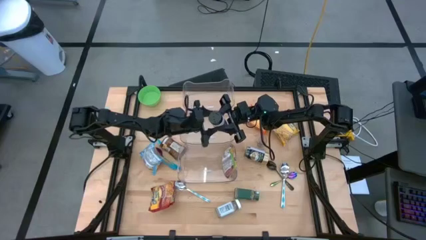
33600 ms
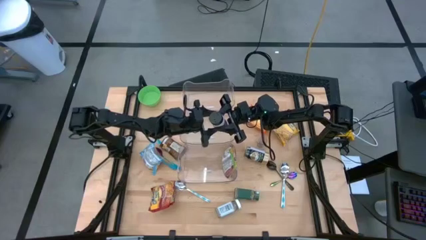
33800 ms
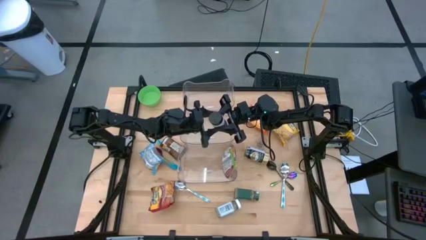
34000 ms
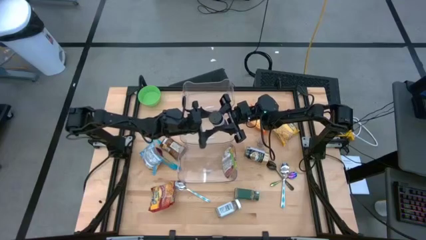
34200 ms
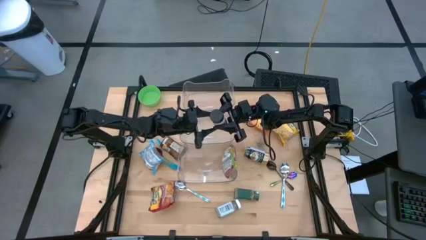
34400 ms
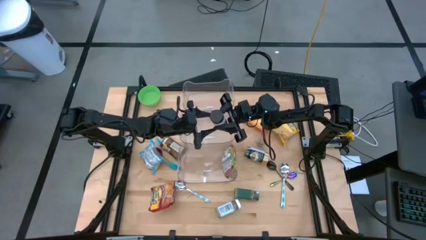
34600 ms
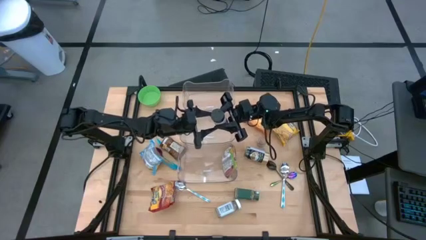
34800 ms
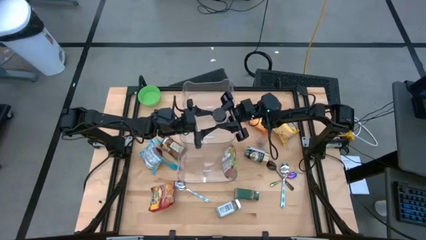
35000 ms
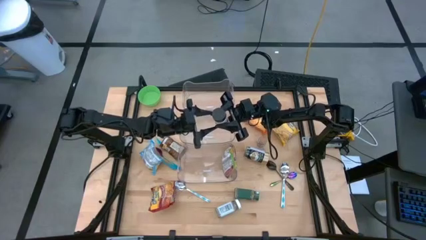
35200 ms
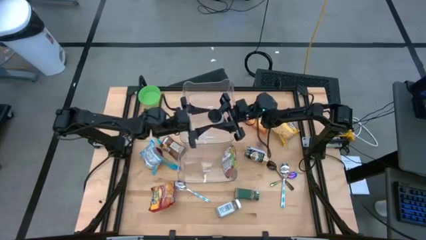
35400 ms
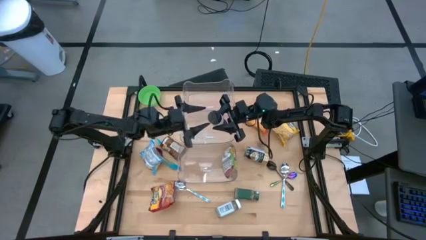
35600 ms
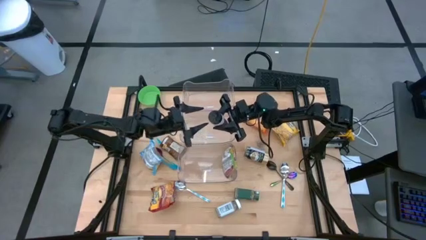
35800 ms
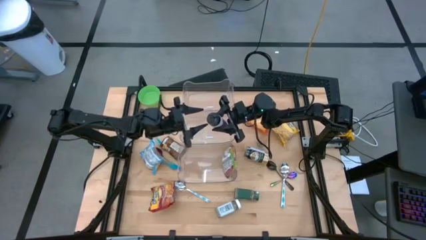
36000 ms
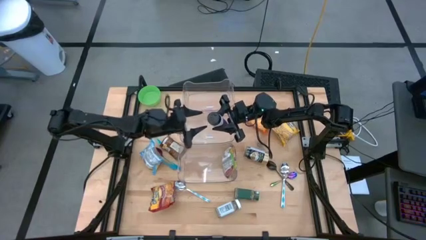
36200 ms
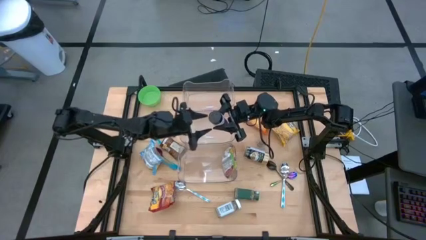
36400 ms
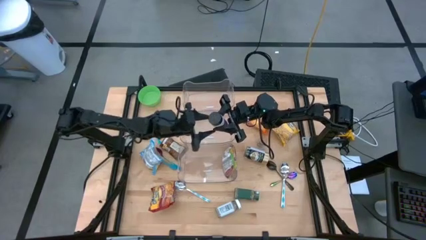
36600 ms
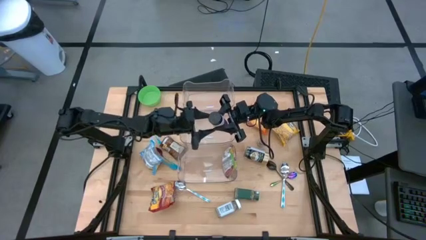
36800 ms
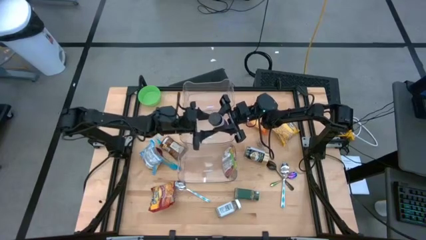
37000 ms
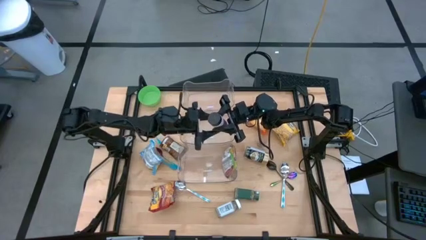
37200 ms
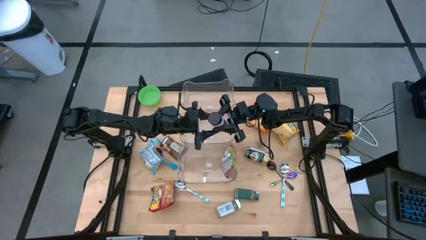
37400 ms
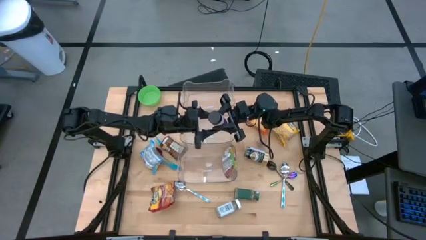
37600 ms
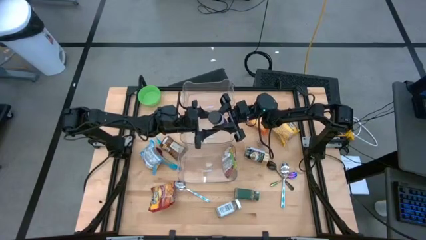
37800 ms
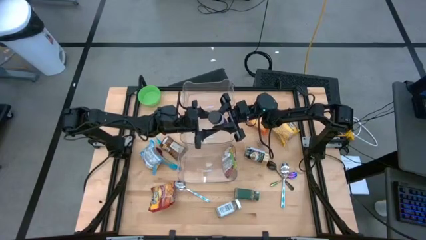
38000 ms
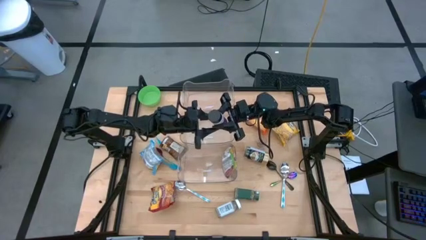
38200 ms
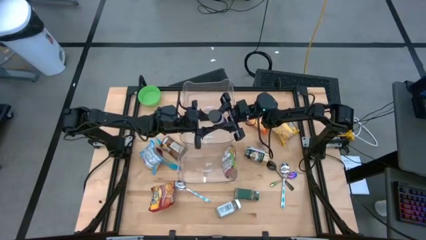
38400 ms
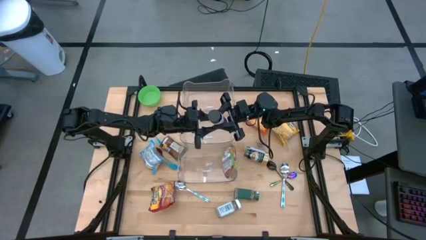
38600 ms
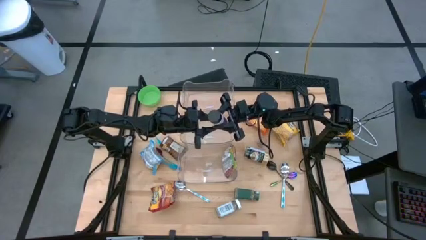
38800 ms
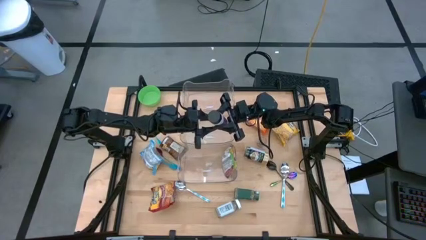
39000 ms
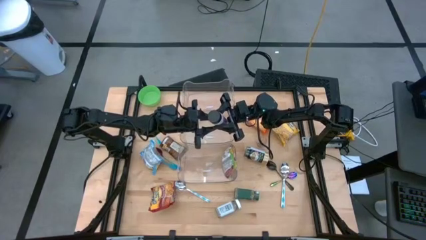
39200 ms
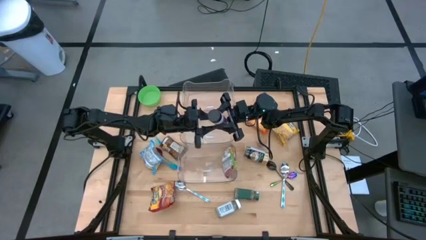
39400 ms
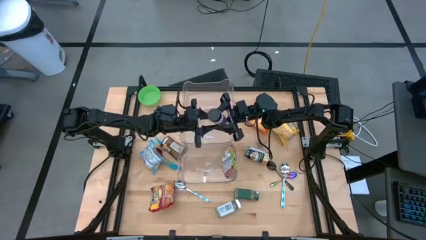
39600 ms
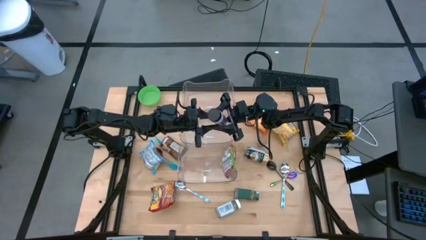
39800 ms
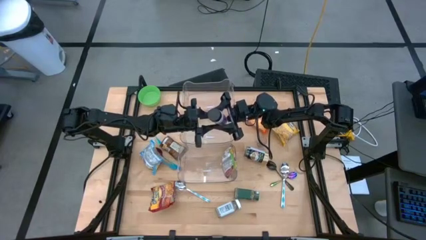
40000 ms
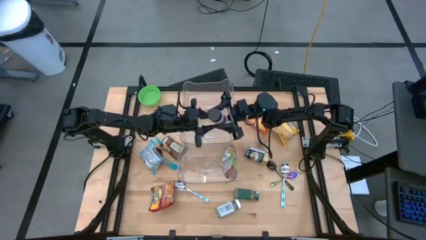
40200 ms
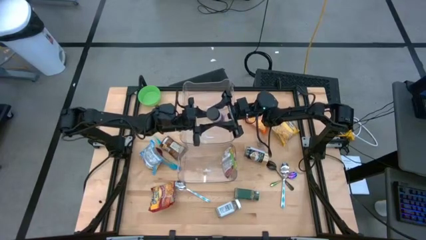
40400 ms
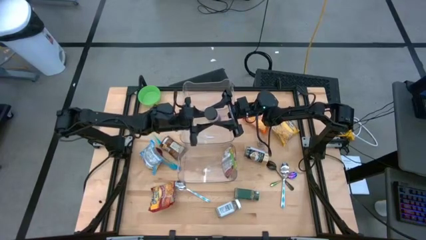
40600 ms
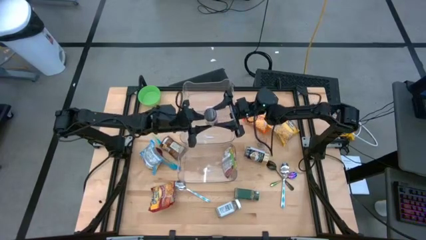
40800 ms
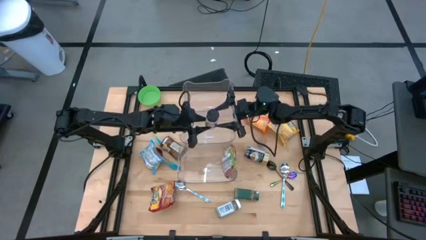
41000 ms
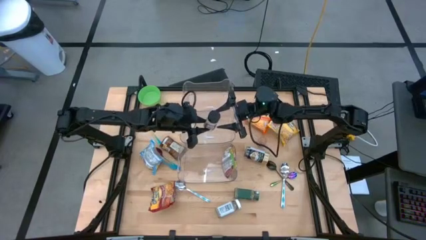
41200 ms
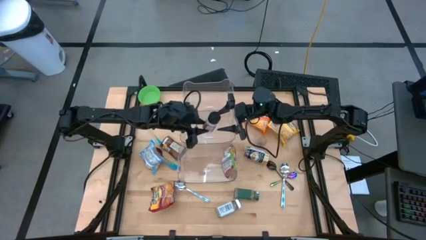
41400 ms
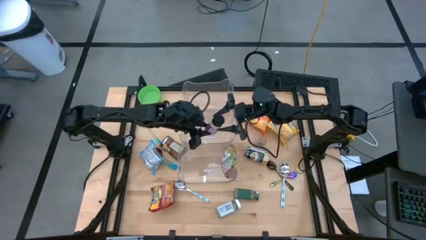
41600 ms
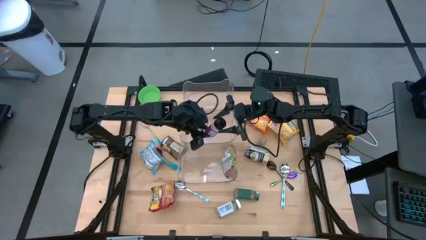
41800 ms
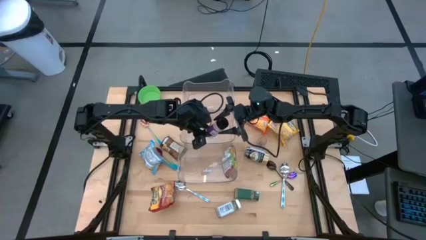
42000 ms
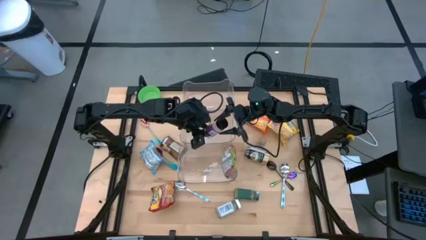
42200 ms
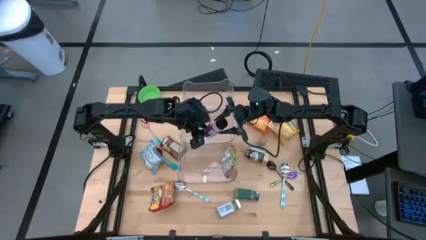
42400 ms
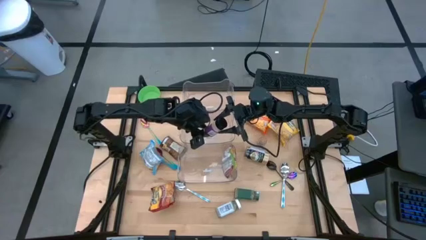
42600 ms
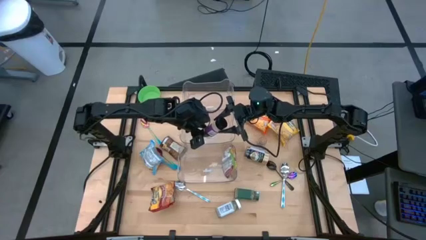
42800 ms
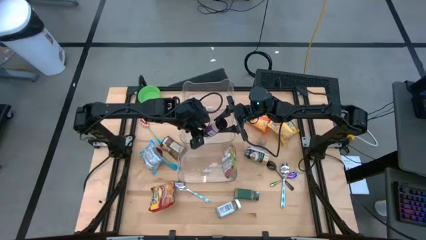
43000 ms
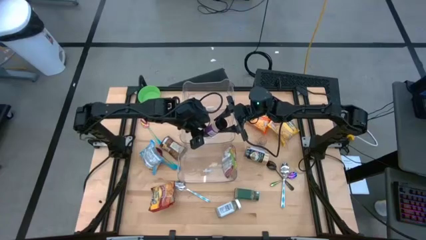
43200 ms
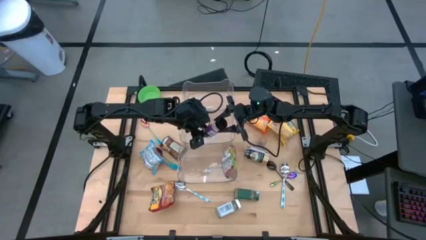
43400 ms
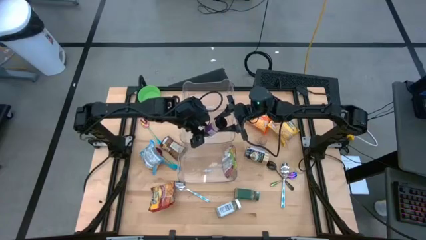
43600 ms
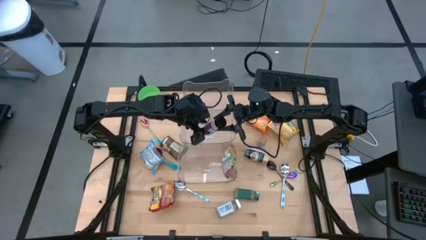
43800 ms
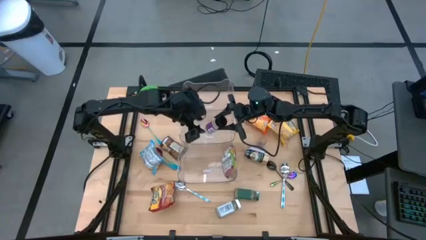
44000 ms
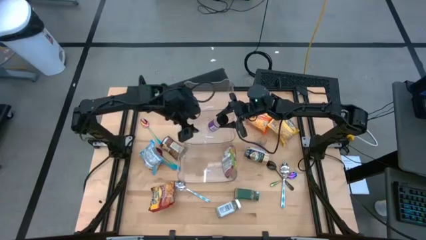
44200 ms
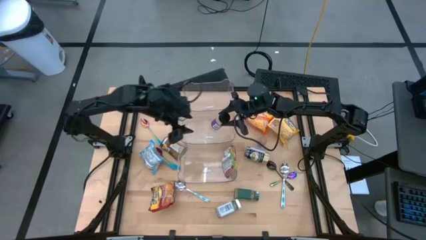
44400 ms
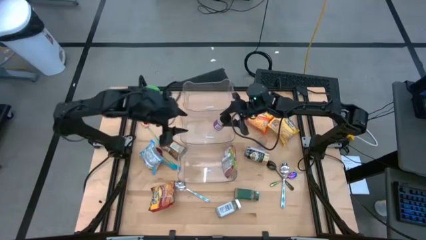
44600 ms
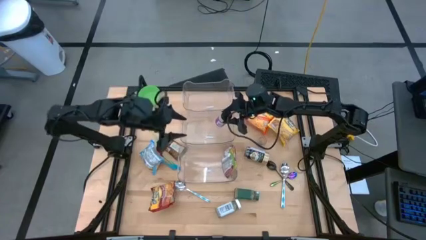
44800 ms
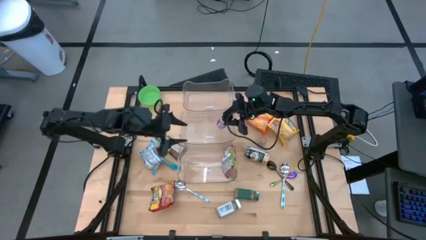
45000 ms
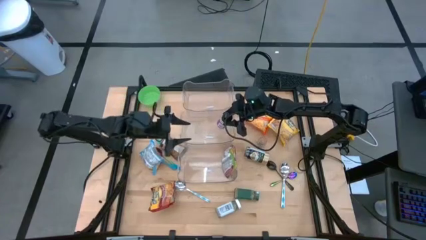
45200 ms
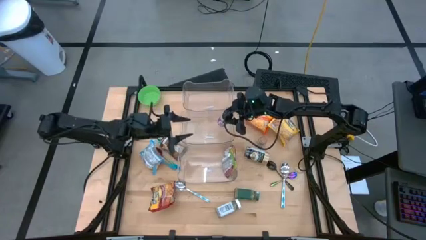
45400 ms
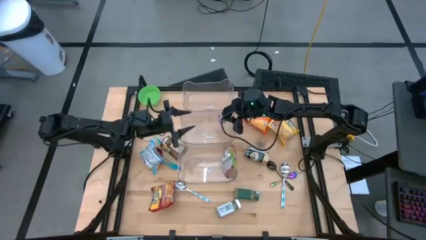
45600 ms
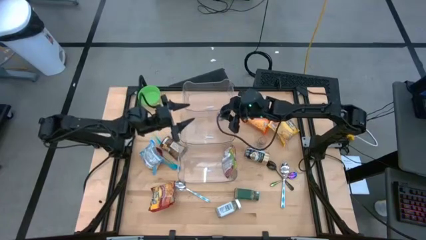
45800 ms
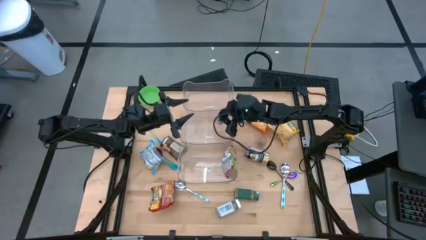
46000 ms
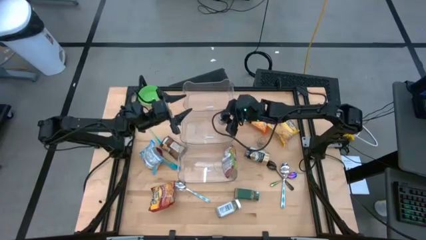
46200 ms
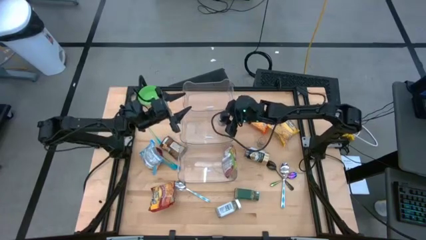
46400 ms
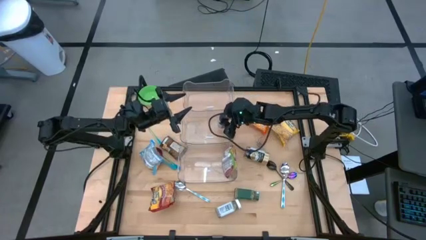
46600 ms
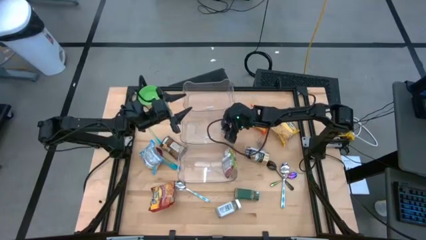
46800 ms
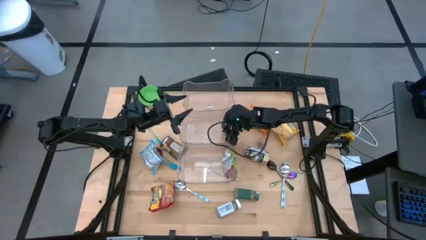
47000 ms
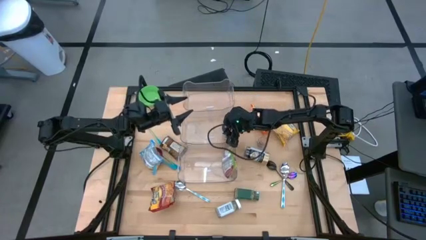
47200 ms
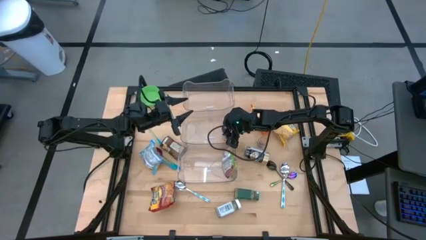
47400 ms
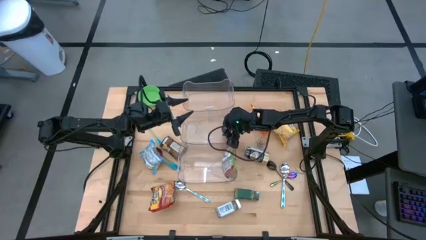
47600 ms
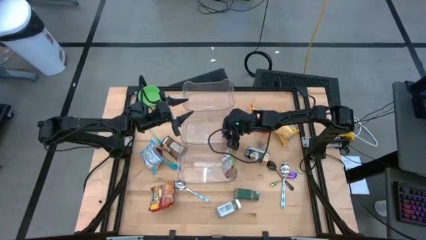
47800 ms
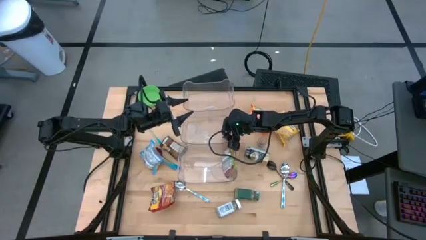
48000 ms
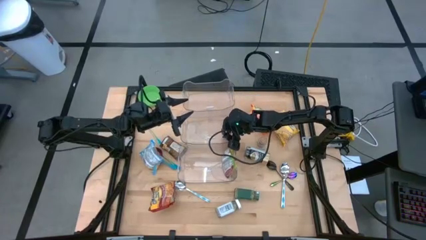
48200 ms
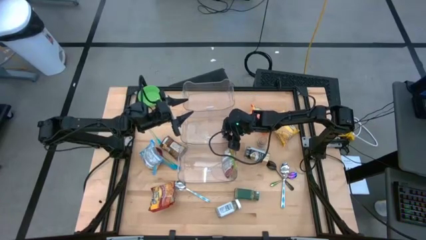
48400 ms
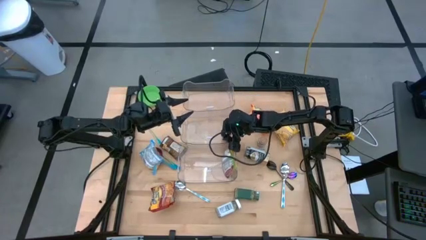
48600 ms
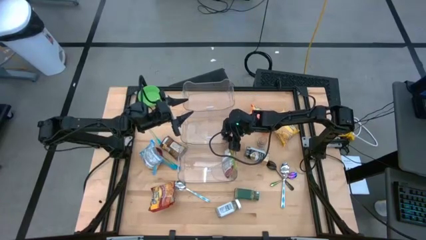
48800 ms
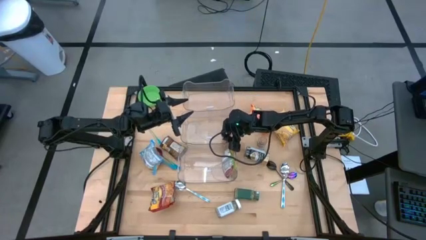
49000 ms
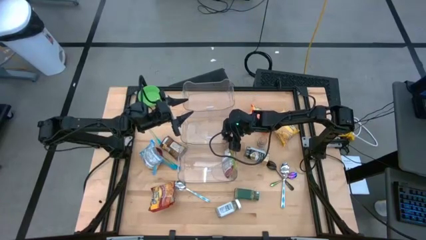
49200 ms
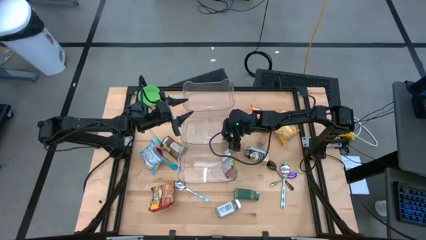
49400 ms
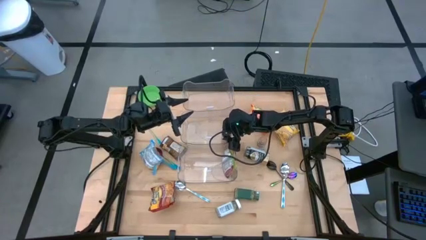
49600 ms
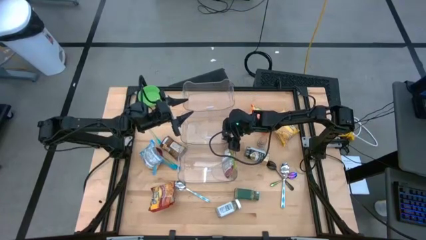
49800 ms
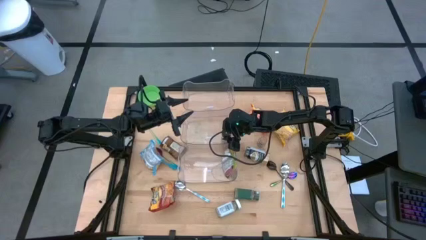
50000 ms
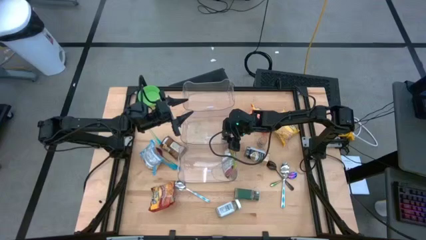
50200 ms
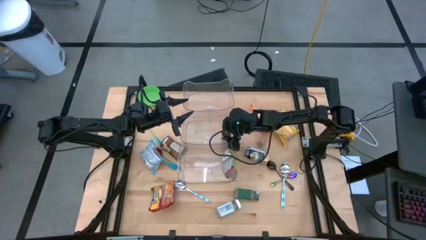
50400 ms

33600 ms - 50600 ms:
Task: Pick & Place Food Item
Put the purple seasoning bottle into the middle transparent bin
